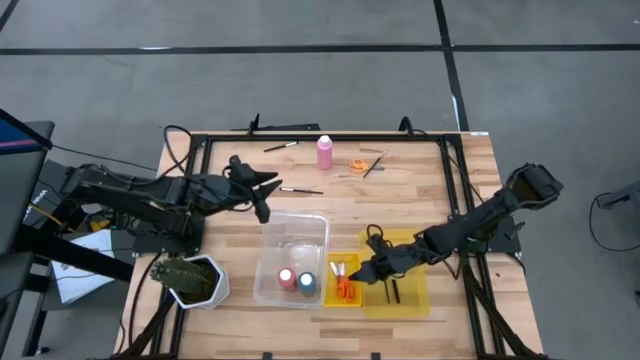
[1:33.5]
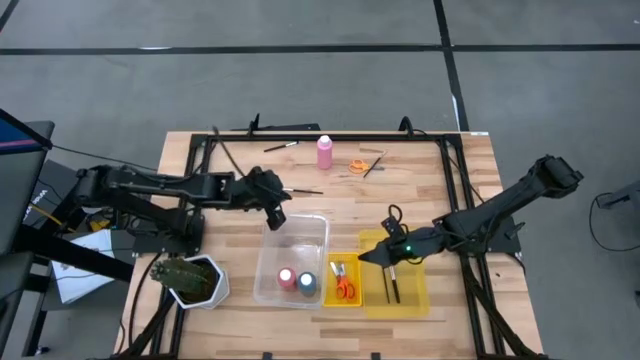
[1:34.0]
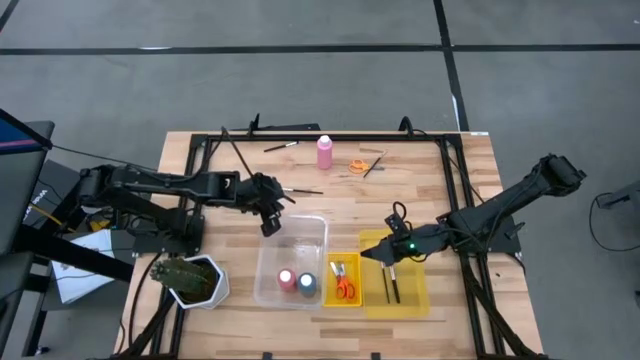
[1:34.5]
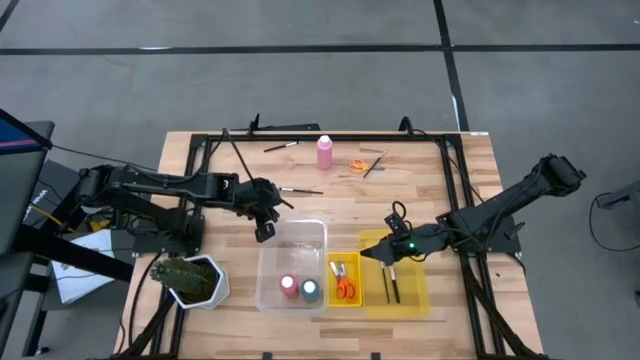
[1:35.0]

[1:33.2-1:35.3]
Task: Pick & Place Paint Supplies
Adjust the transparent bin

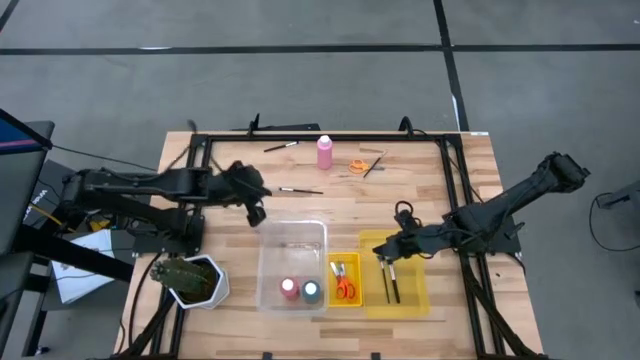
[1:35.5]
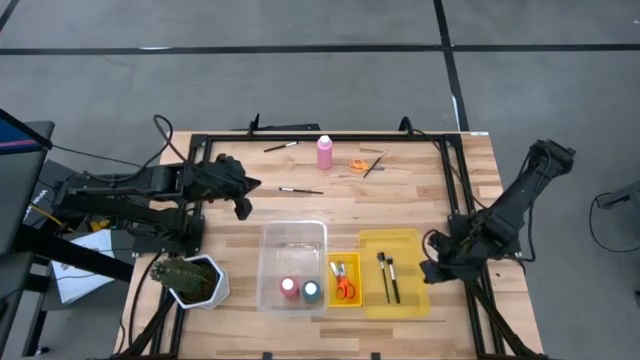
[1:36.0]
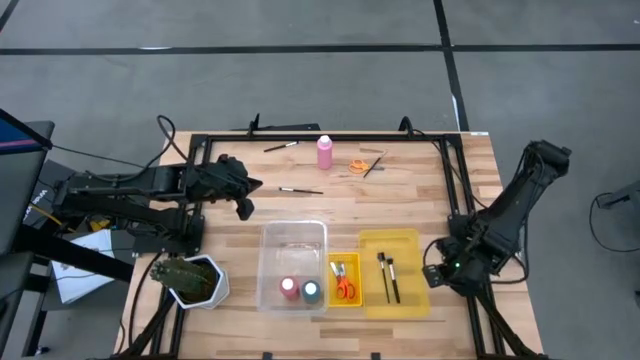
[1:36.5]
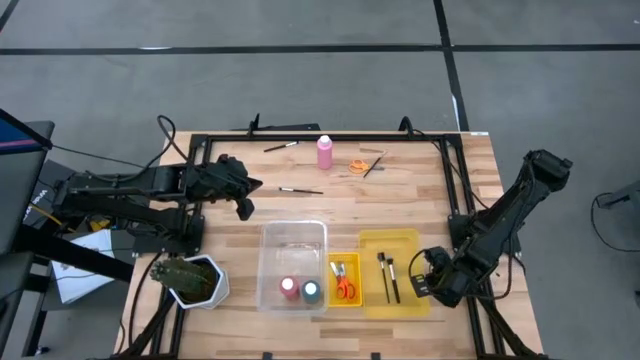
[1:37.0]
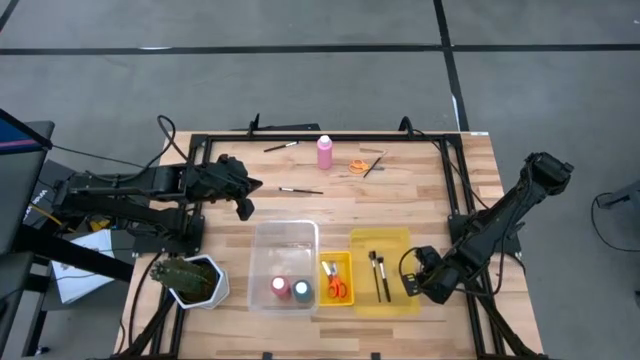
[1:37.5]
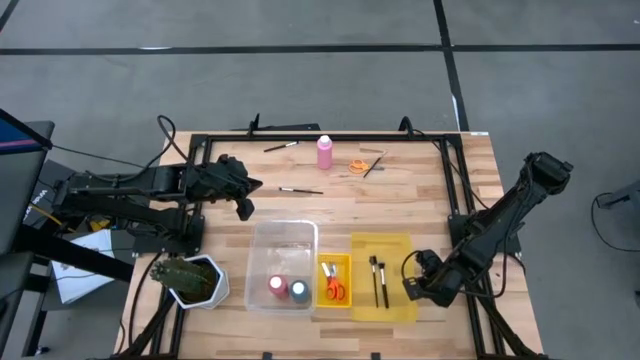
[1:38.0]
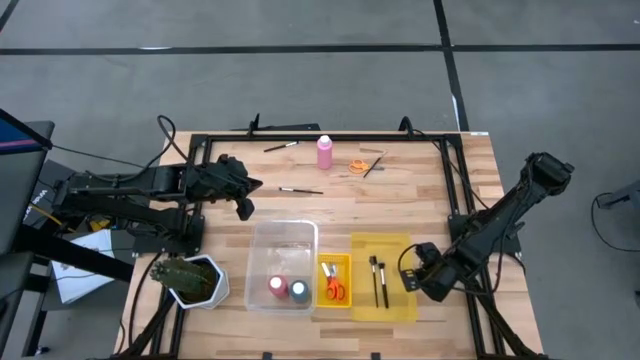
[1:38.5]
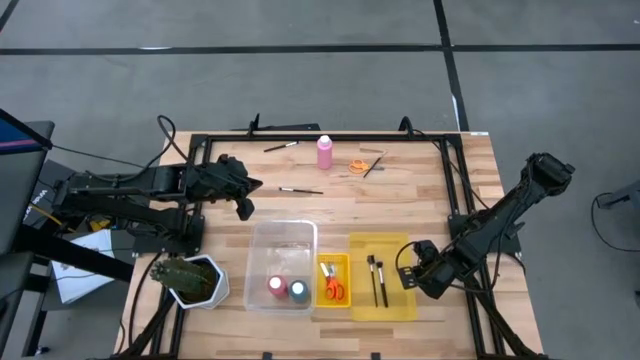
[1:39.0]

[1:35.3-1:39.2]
Adjust the right yellow bin

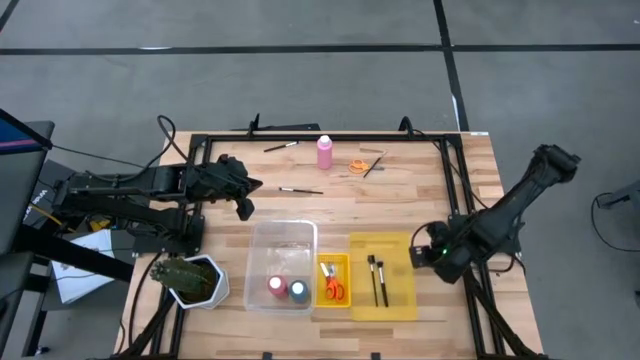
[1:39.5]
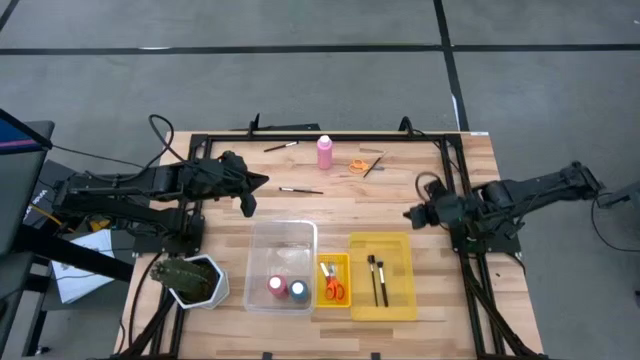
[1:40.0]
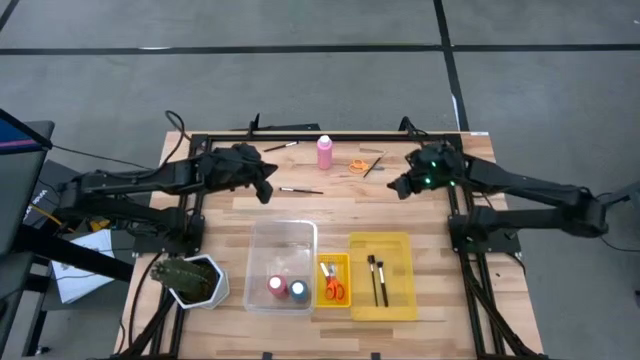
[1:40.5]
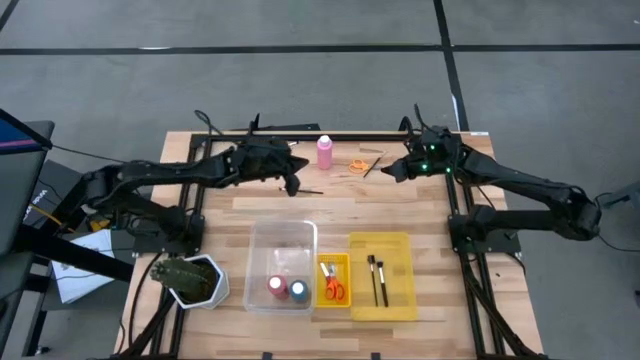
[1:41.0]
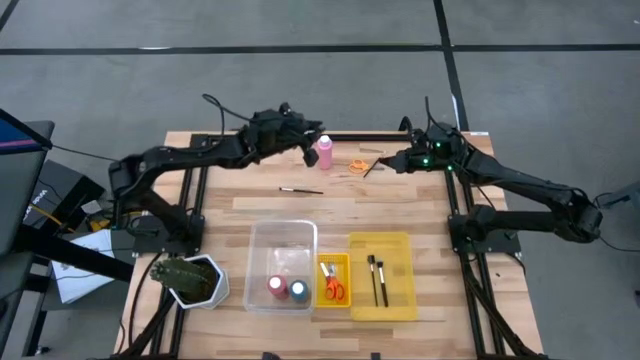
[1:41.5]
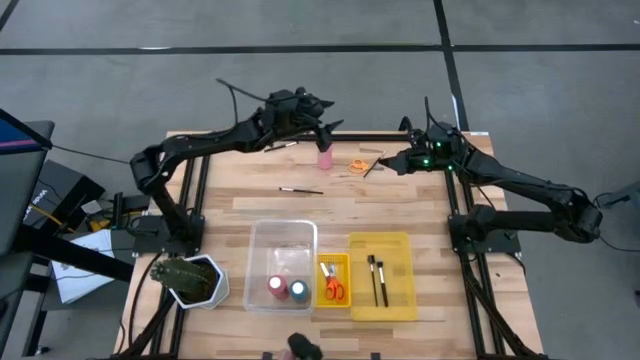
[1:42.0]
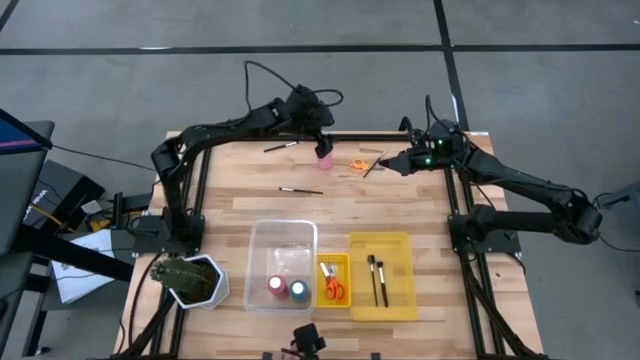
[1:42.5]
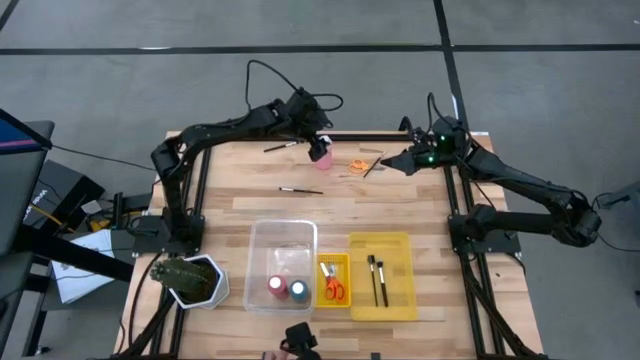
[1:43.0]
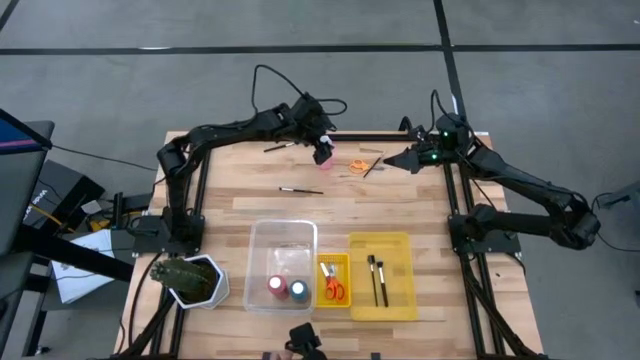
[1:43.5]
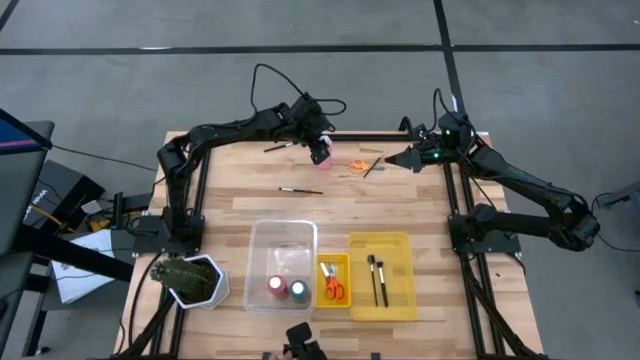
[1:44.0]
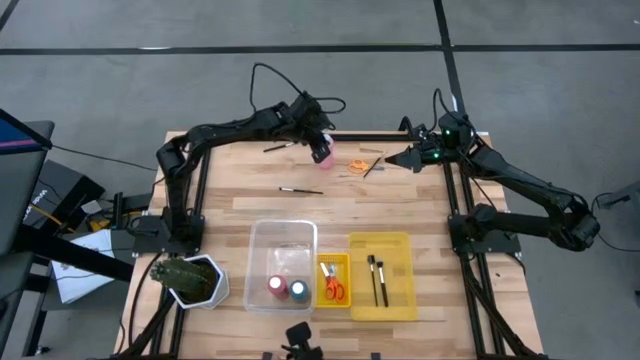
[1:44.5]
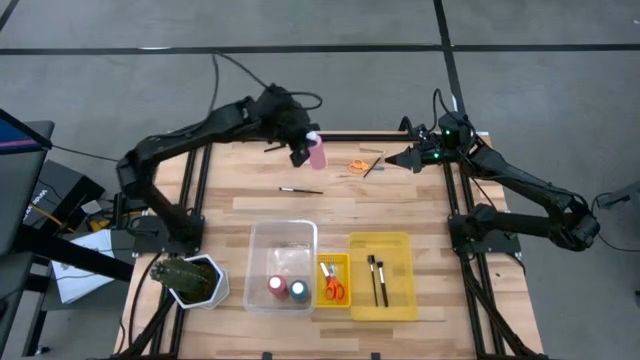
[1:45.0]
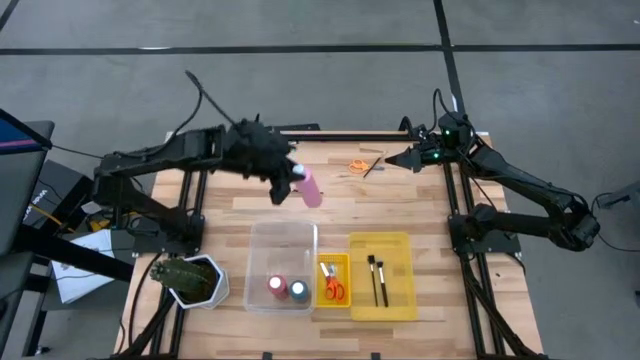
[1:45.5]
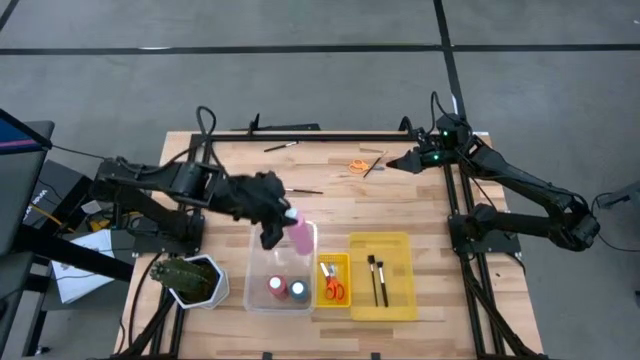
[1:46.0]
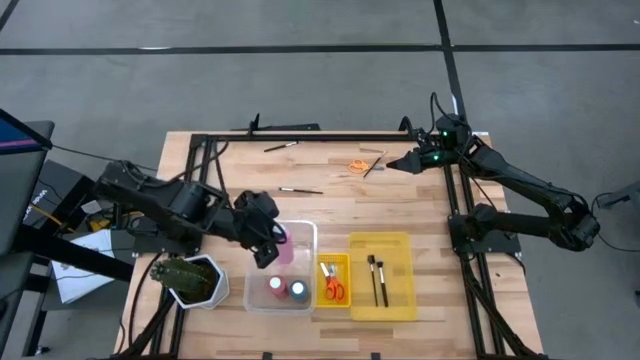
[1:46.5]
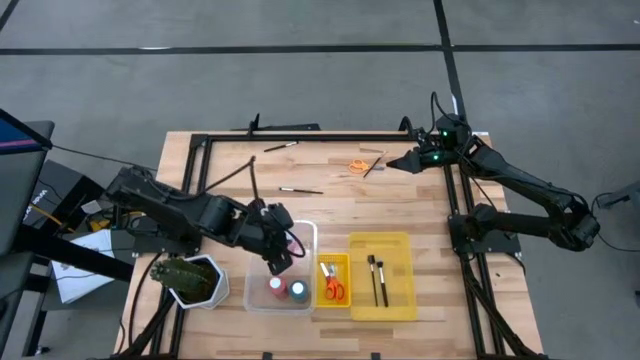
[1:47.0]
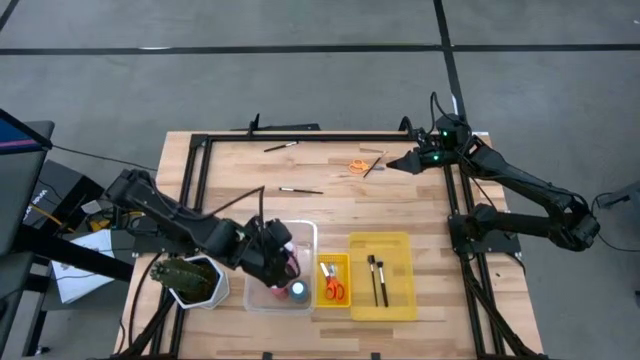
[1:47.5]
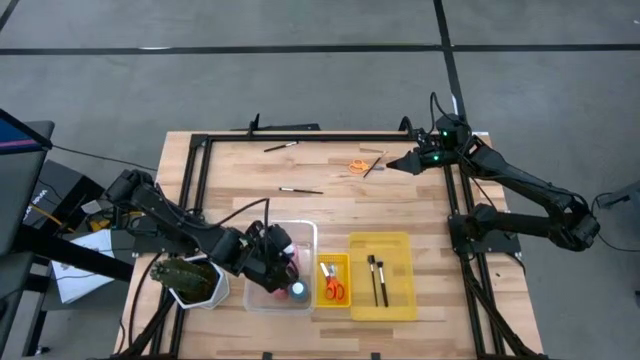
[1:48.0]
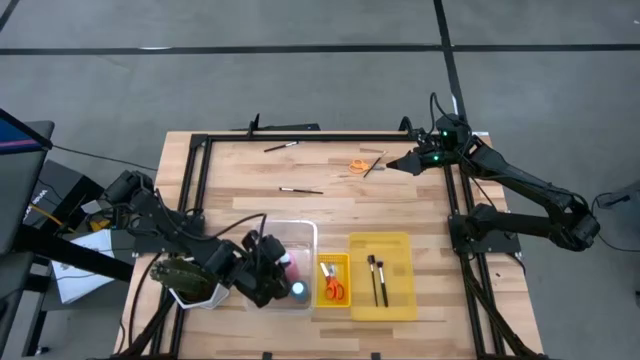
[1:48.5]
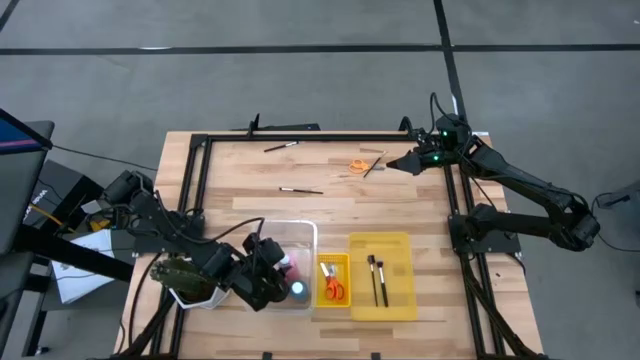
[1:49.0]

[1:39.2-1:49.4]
Put the pink bottle into the transparent bin
